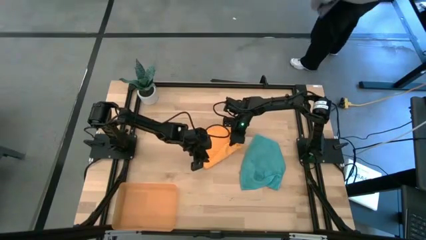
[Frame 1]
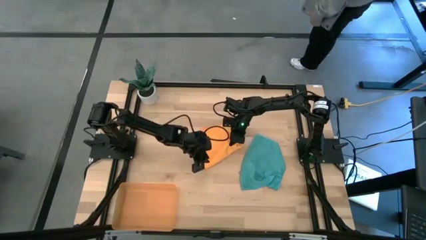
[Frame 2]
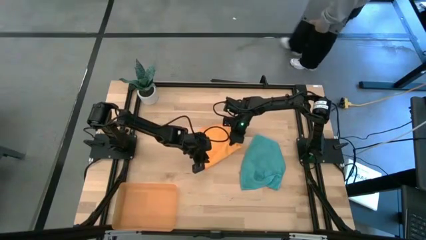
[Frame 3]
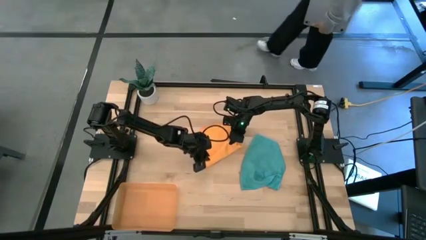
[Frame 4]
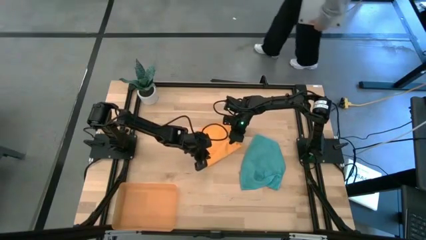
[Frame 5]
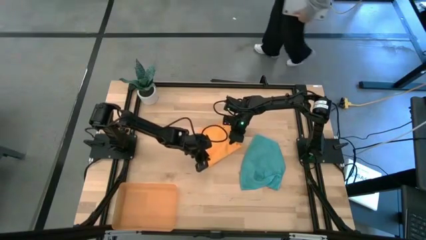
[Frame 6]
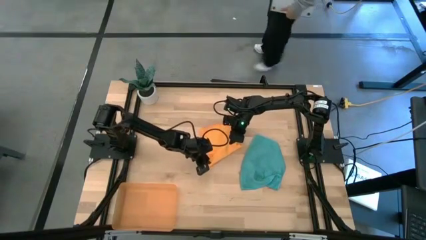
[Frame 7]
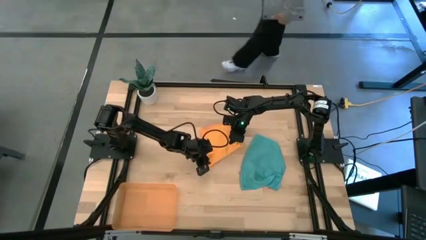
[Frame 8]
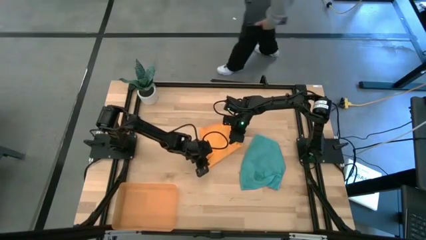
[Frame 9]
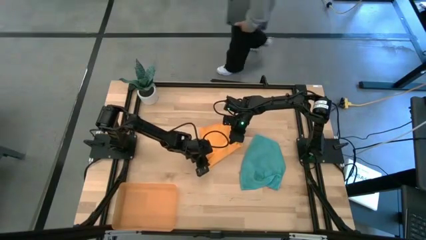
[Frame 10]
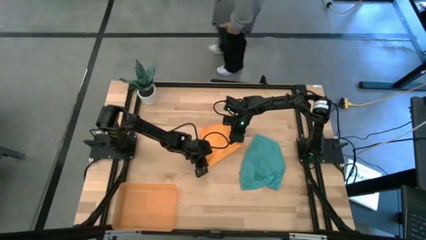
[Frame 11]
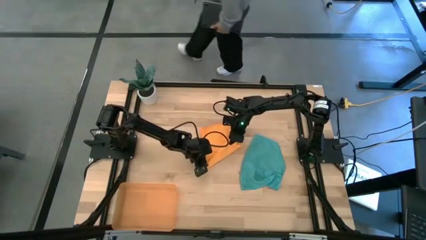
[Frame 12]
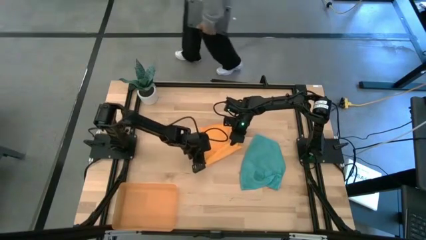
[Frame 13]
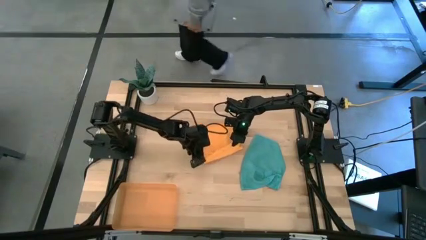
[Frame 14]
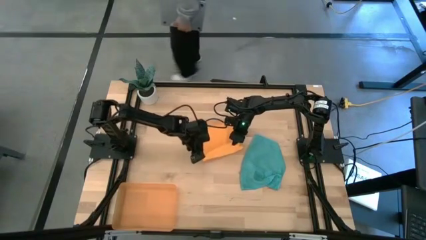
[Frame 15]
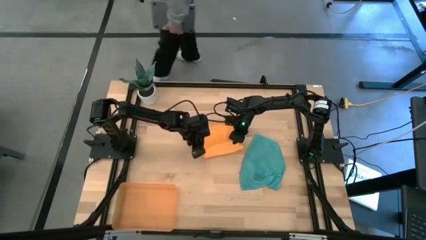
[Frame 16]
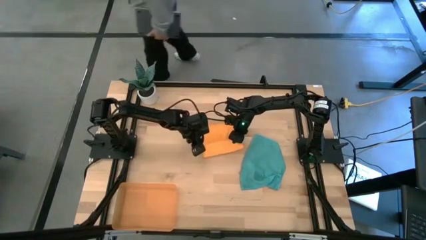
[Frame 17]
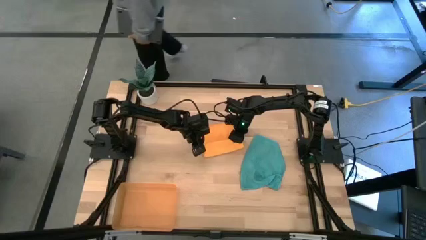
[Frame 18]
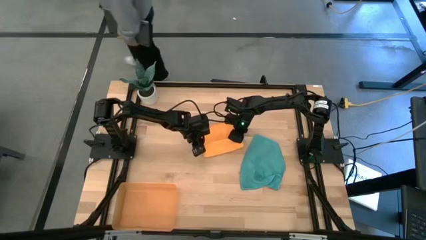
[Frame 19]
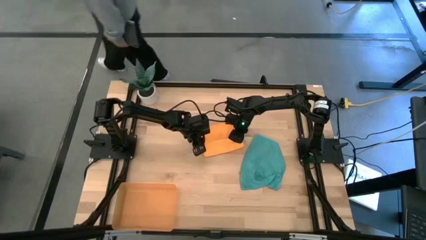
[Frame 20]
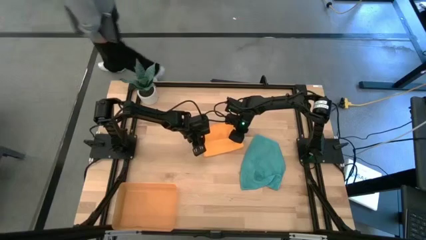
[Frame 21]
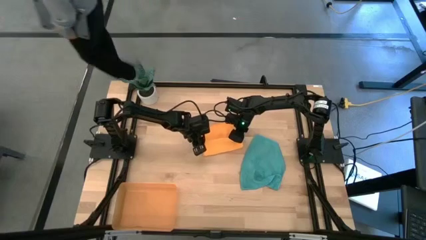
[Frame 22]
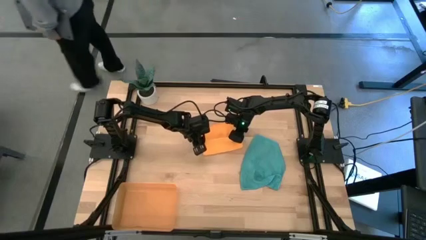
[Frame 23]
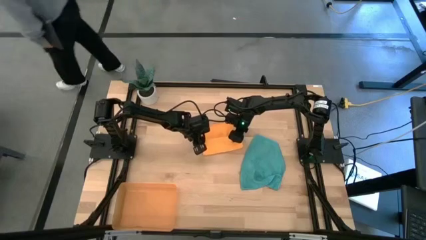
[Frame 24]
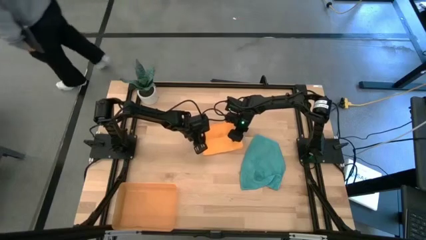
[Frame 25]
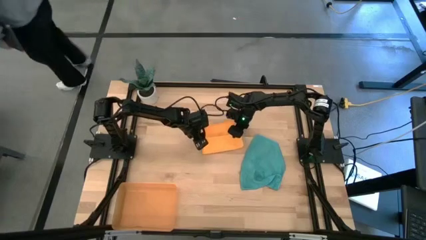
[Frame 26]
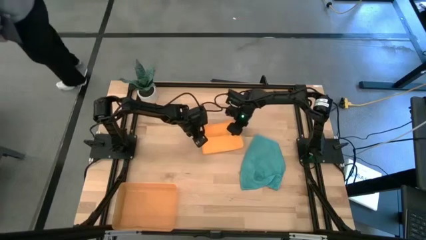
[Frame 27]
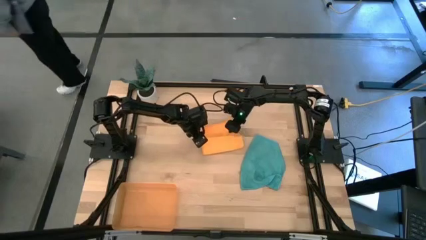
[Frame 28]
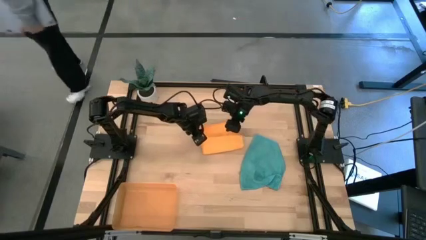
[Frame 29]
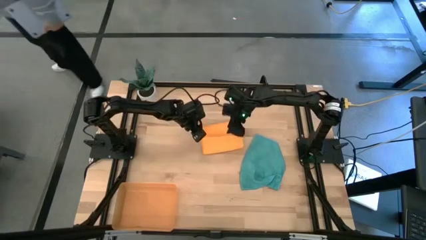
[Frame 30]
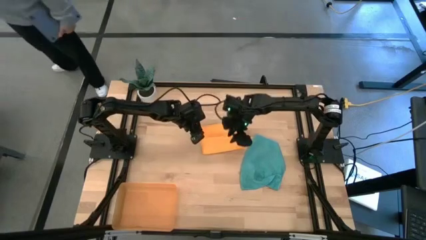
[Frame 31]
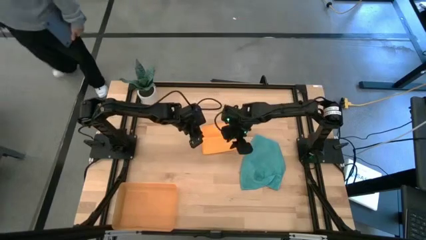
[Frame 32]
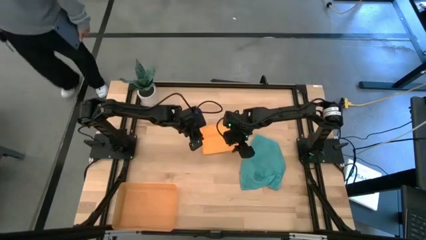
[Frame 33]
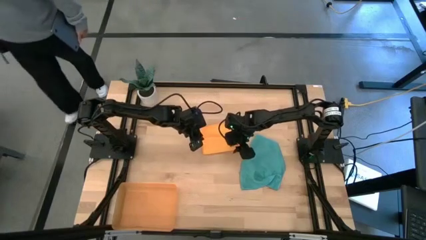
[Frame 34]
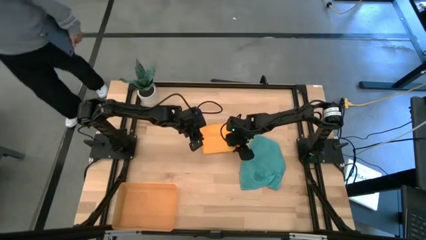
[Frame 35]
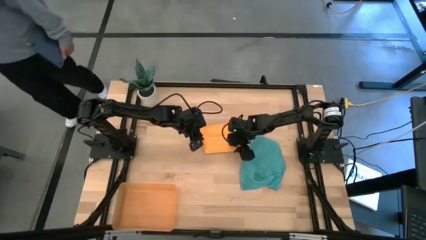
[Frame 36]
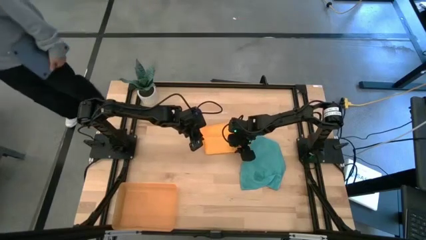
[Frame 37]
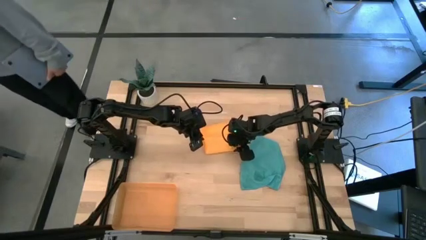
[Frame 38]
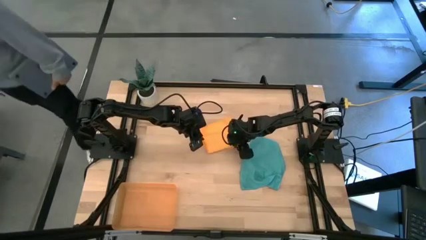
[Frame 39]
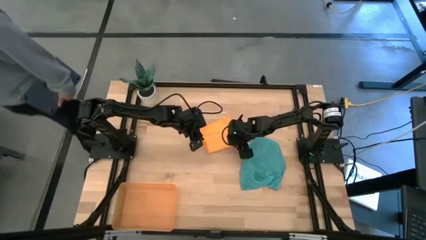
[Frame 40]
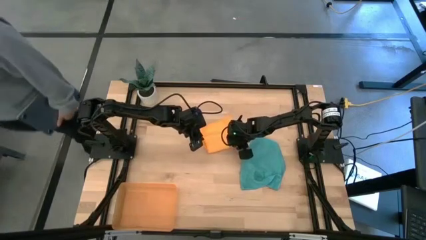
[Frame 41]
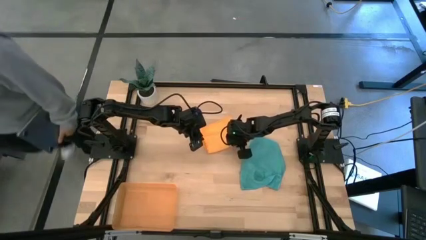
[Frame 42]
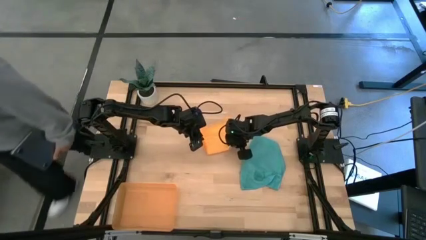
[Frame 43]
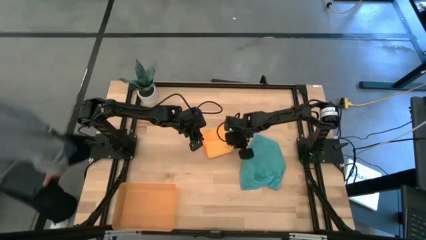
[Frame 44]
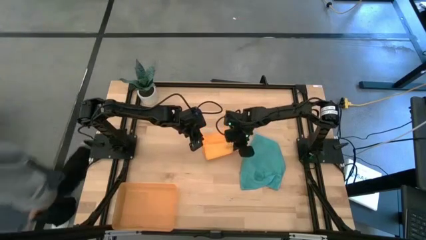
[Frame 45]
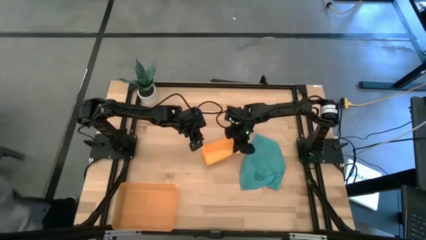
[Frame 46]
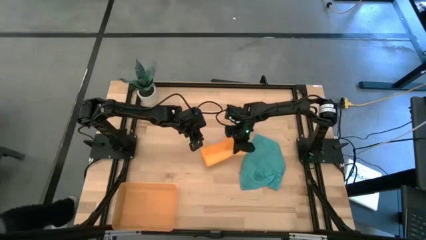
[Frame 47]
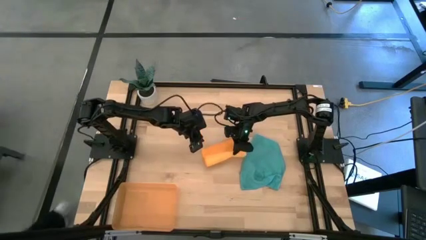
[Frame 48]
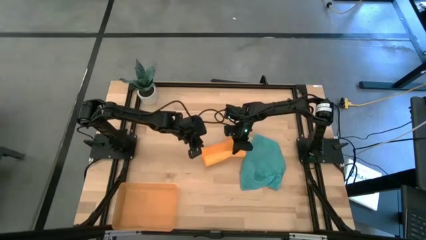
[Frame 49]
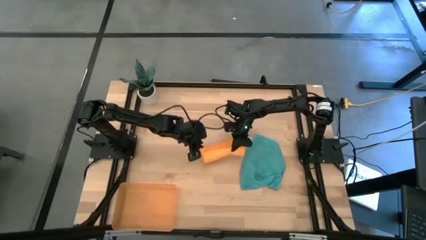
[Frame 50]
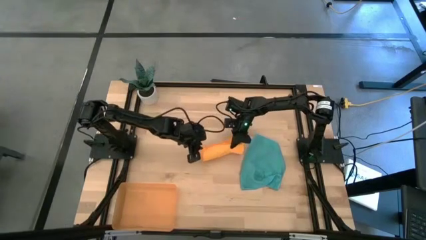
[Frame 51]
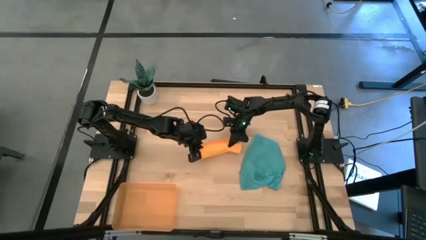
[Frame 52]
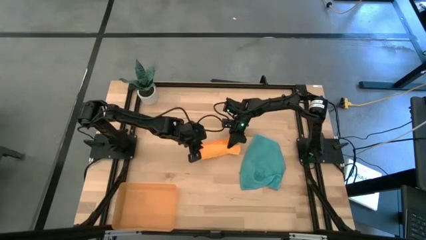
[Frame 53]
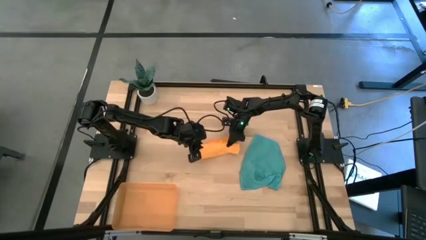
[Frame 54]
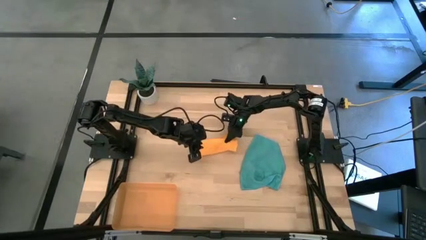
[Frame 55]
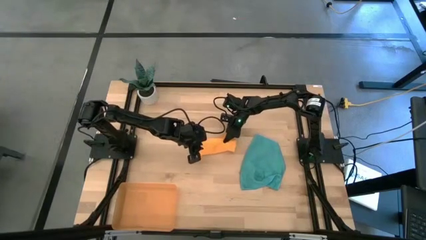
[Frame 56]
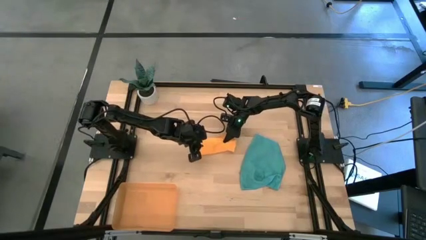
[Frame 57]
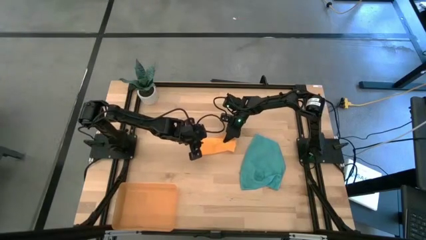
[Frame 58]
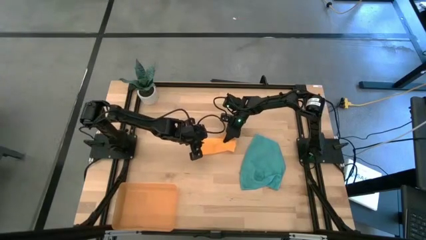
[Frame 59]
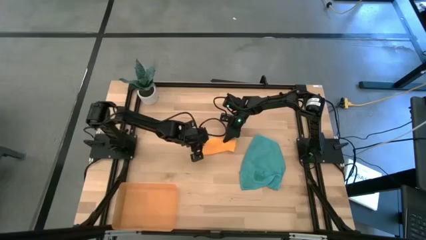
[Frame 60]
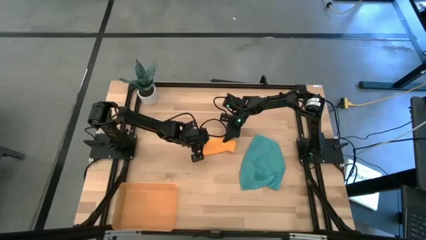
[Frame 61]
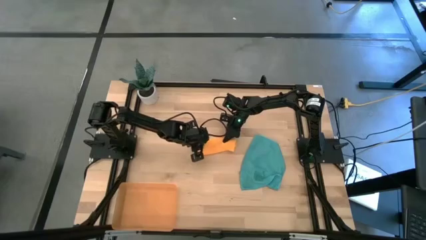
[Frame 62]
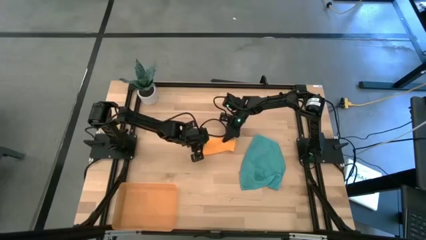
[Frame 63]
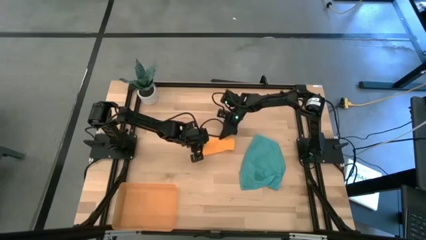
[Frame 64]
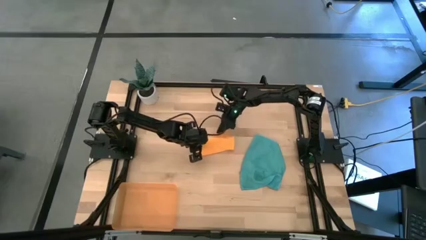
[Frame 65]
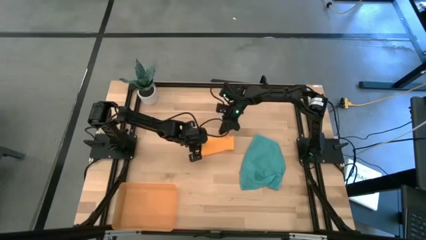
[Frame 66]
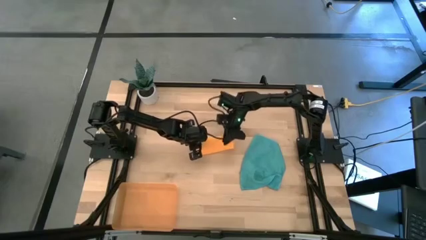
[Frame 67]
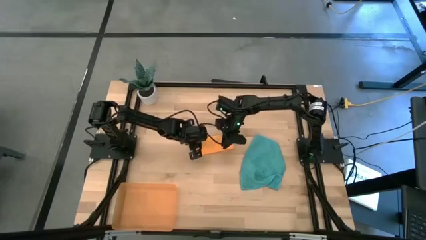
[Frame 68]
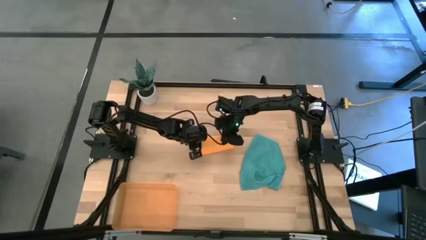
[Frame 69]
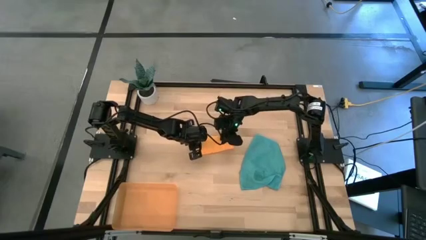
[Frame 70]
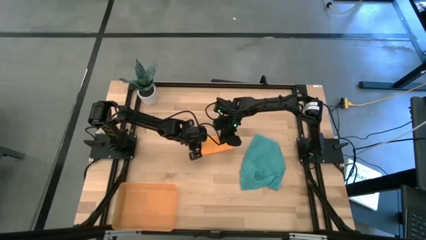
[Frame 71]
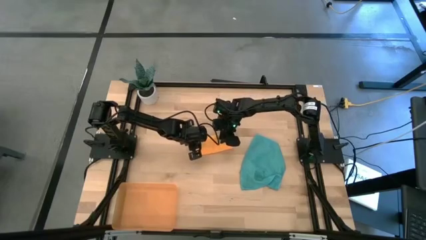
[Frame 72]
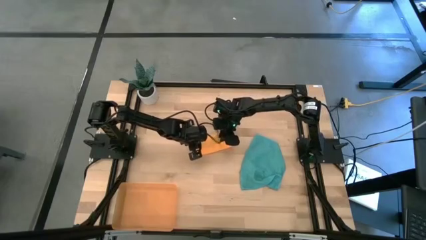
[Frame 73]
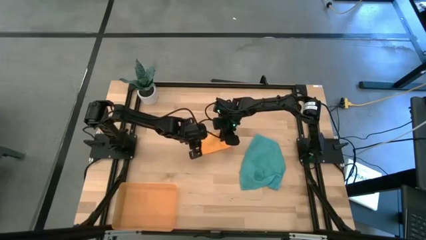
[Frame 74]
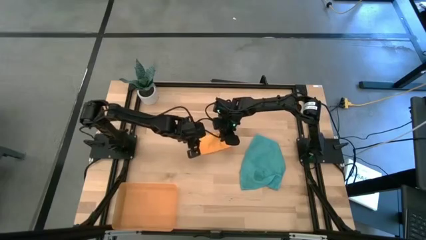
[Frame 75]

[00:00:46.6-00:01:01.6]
Task: Roll microfiber towels into tight, uniform cylinder then place into a basket
Roll the orange microfiber towel
